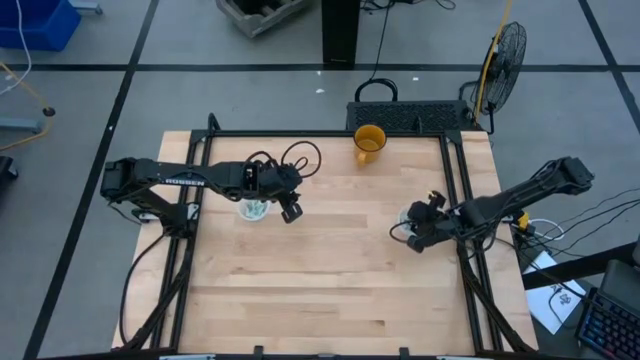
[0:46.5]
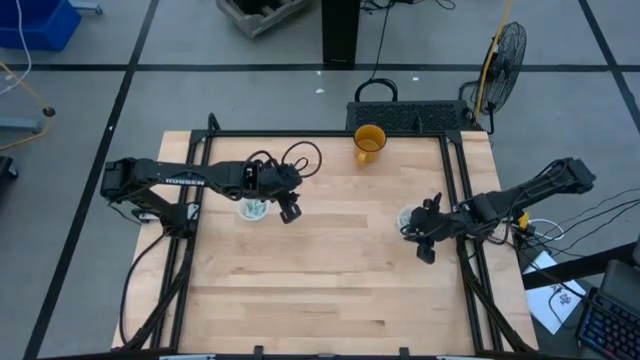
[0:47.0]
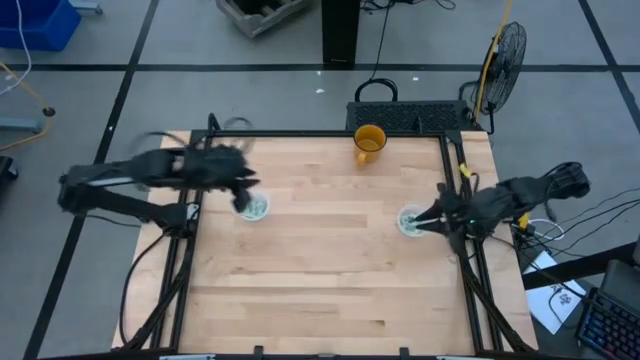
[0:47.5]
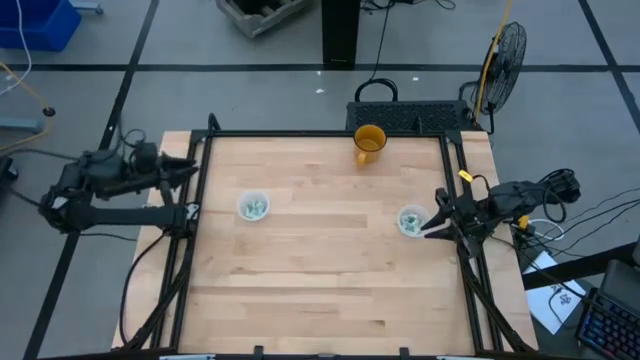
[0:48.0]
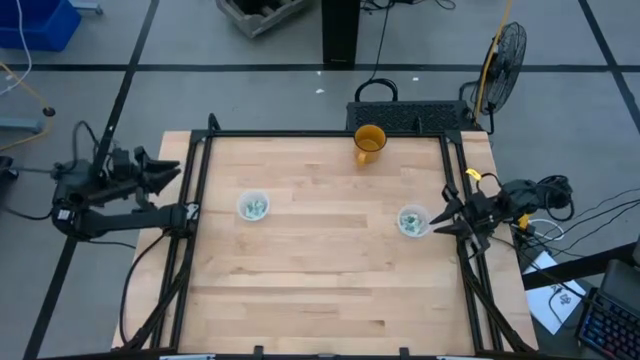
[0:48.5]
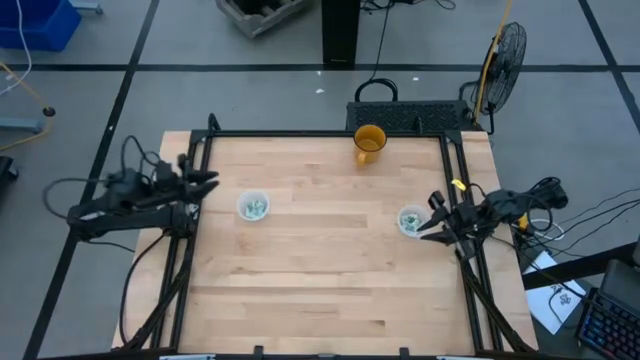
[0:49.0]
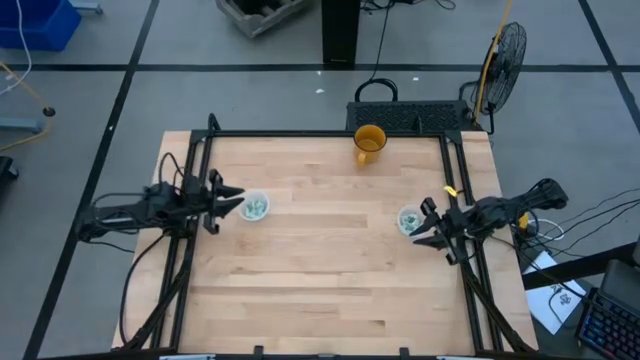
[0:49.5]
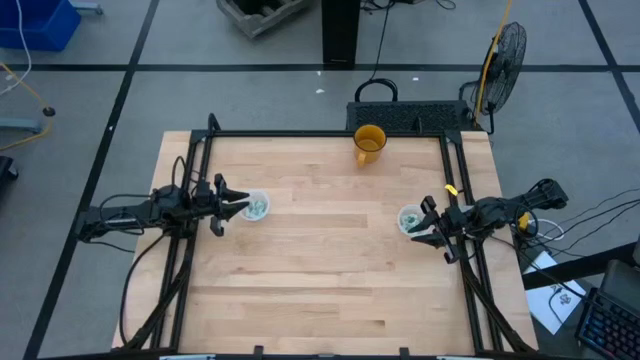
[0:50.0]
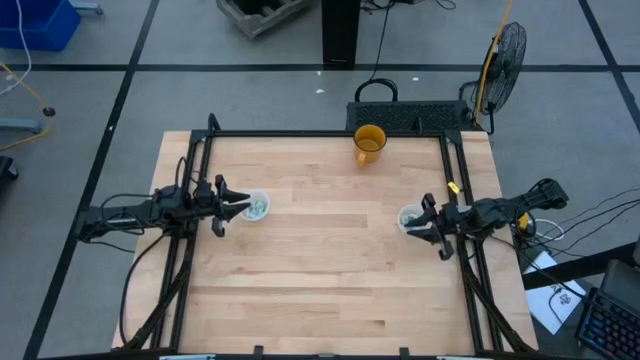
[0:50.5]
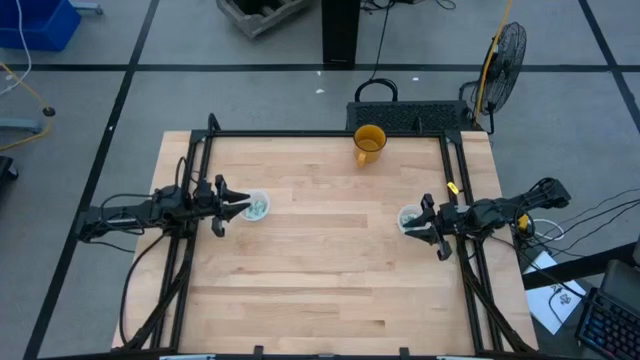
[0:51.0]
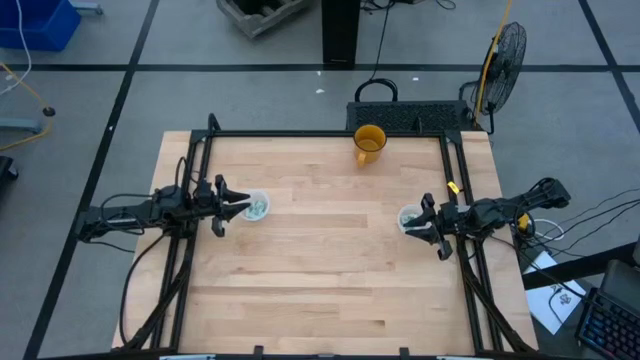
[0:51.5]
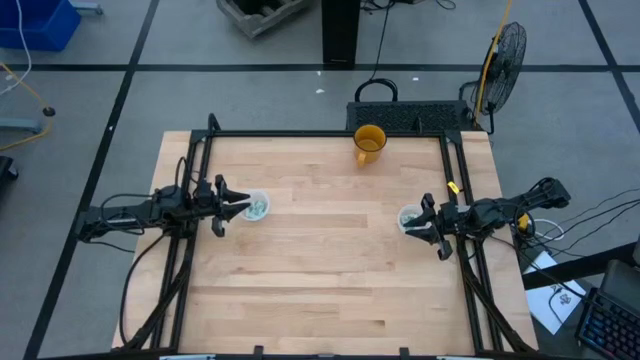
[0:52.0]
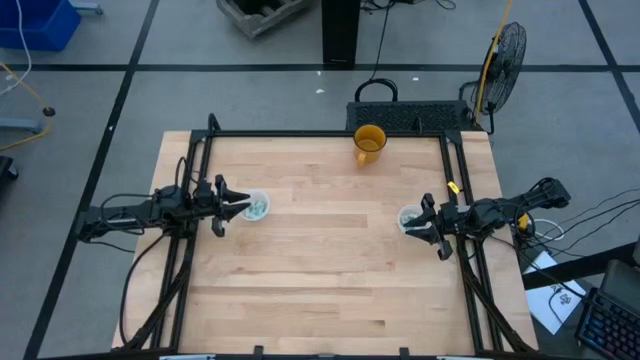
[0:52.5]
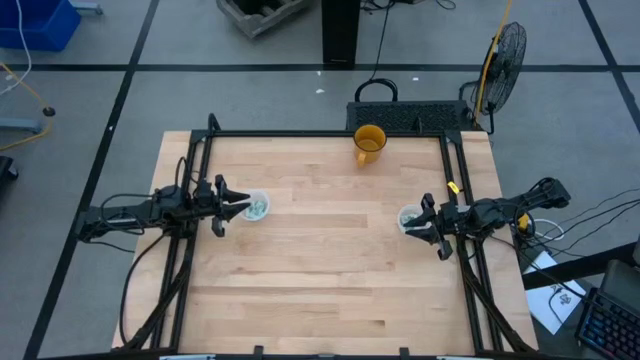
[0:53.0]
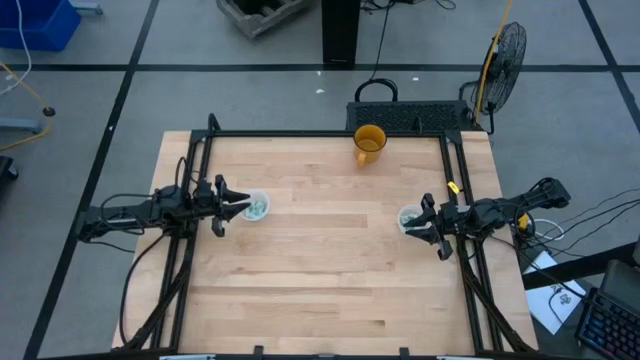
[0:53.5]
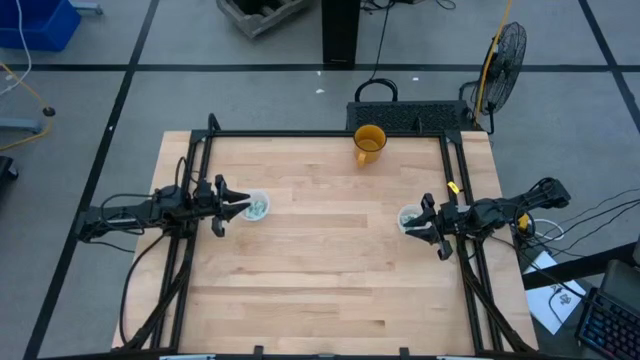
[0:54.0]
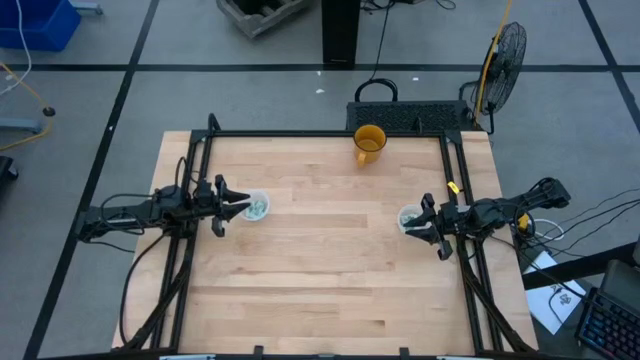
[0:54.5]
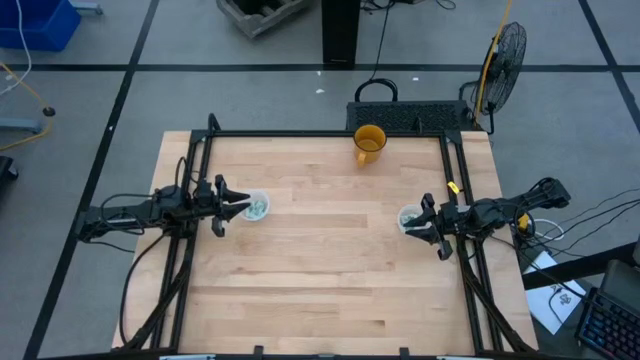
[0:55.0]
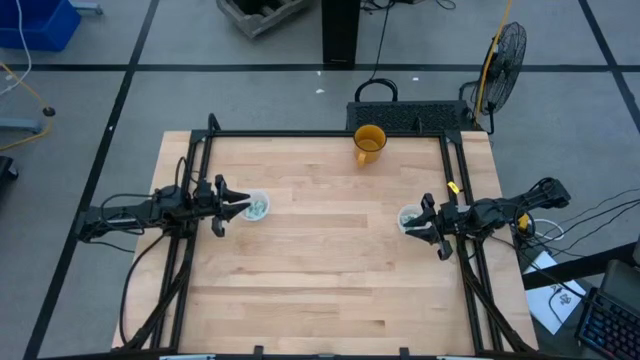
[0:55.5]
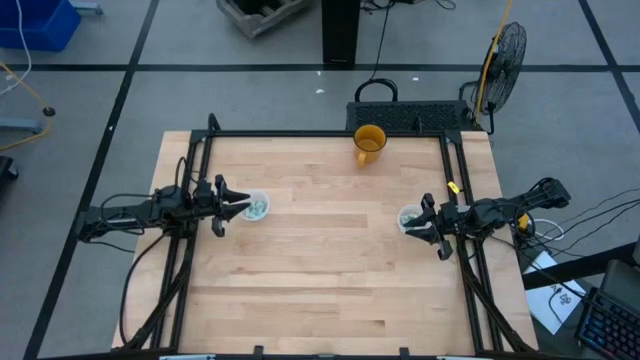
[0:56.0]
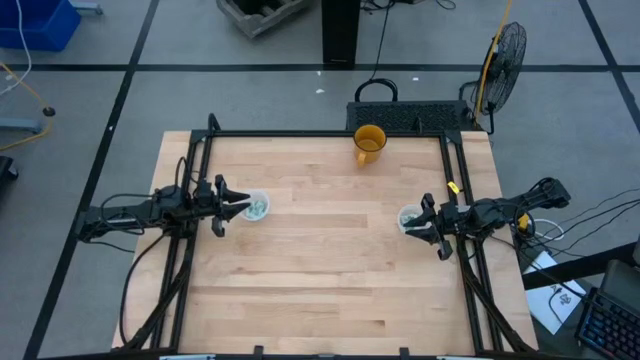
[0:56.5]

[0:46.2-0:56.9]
Task: Pick and place Stevia / Truvia into bins
Return to Home Position

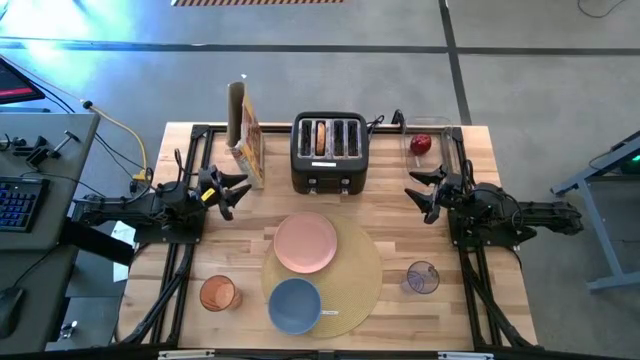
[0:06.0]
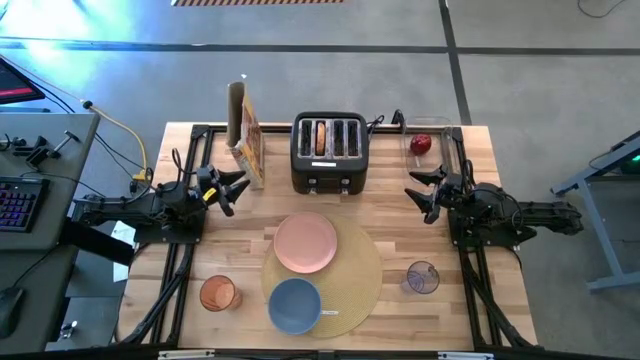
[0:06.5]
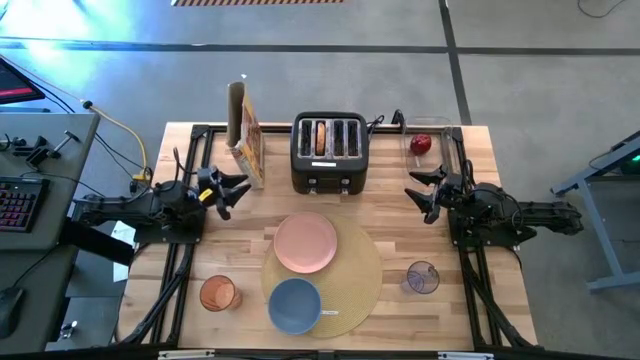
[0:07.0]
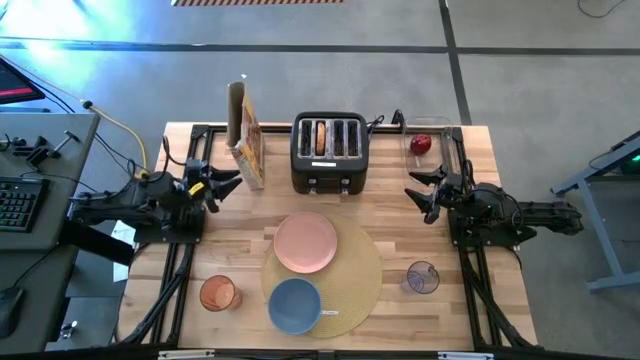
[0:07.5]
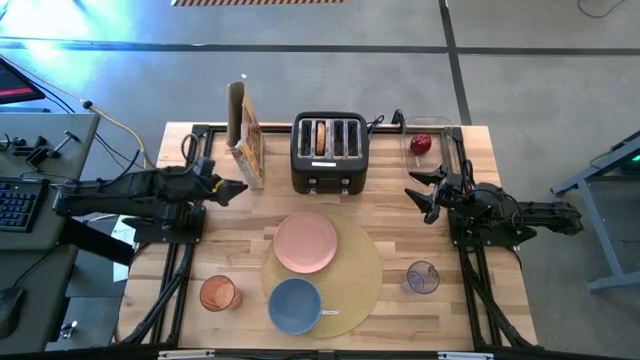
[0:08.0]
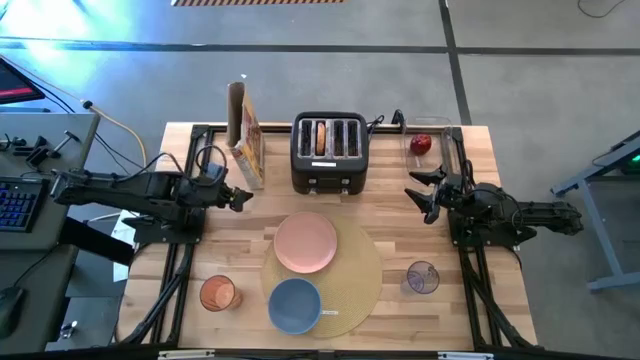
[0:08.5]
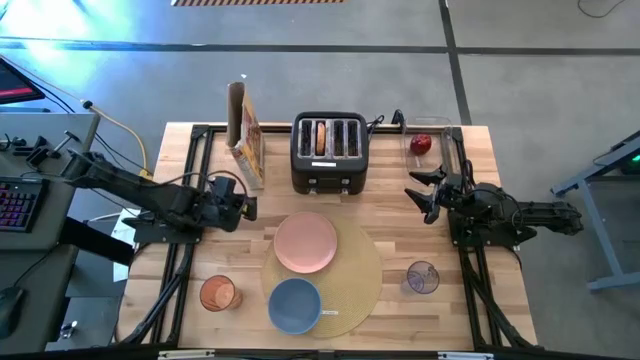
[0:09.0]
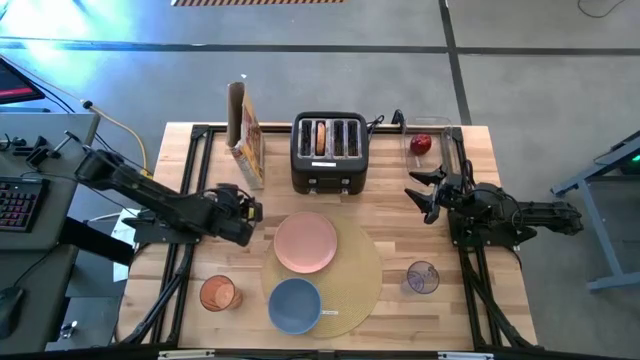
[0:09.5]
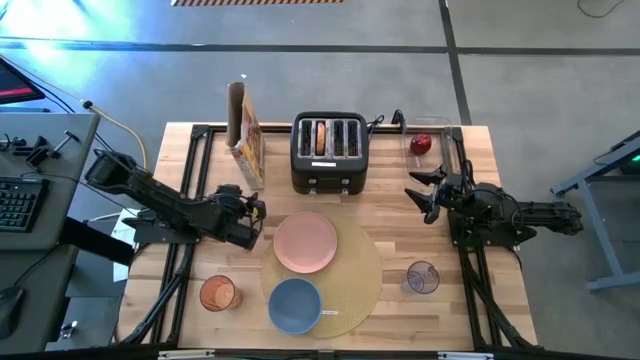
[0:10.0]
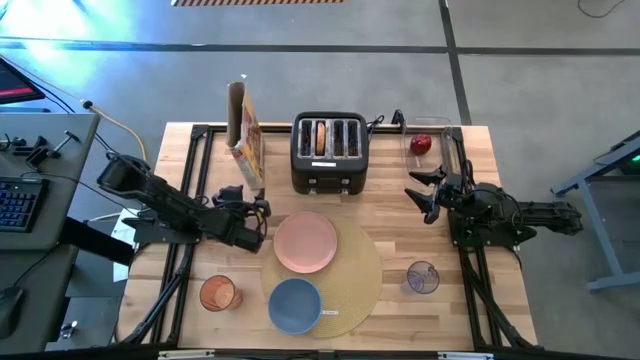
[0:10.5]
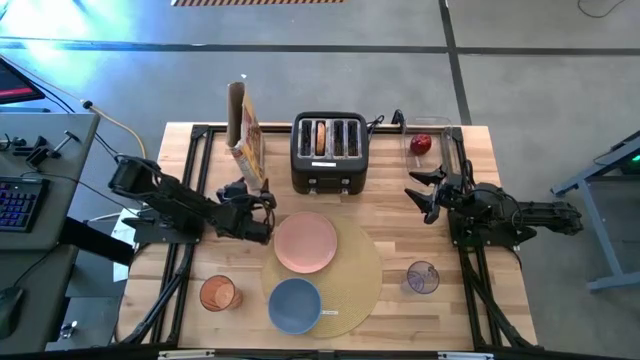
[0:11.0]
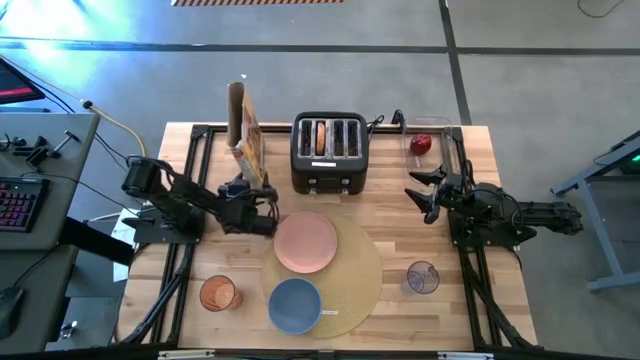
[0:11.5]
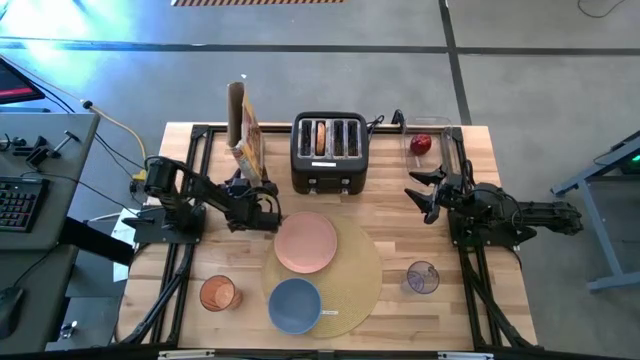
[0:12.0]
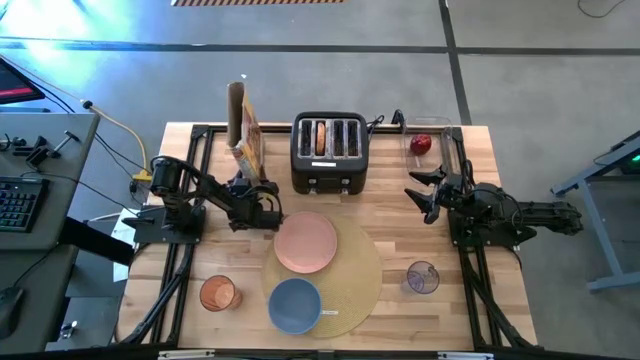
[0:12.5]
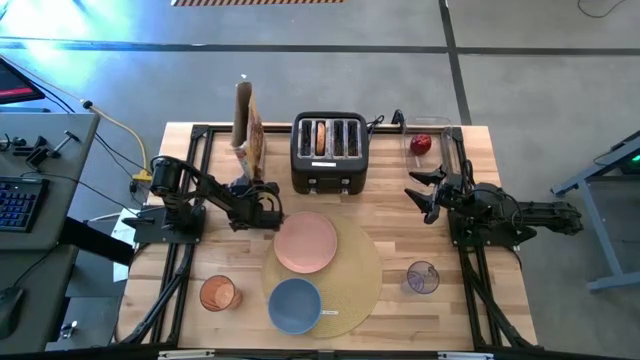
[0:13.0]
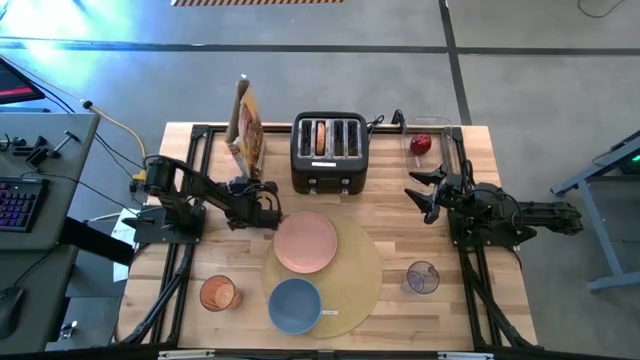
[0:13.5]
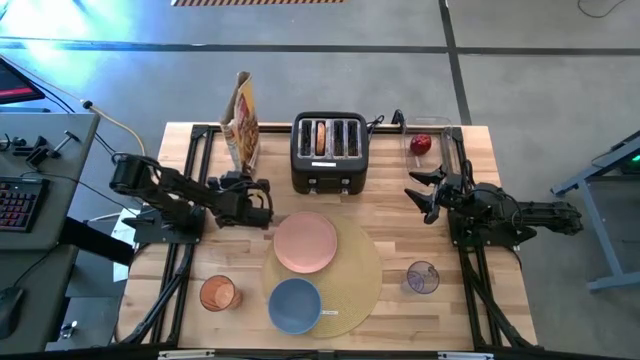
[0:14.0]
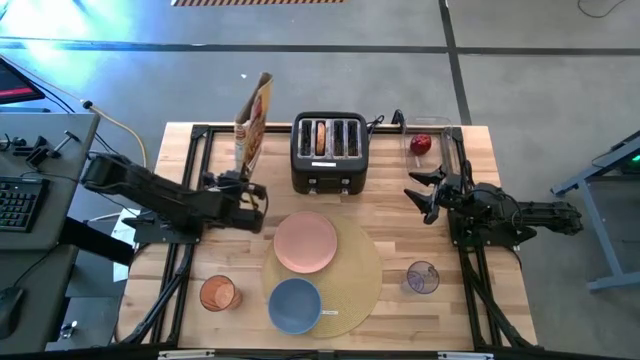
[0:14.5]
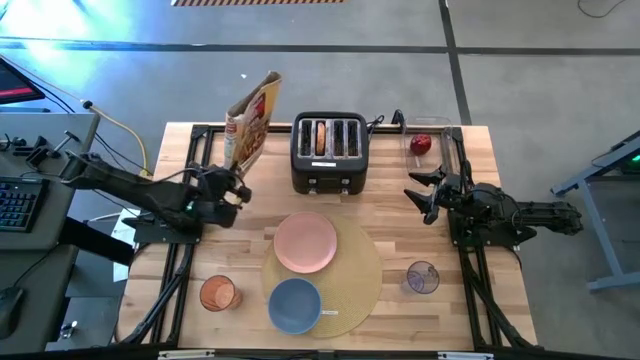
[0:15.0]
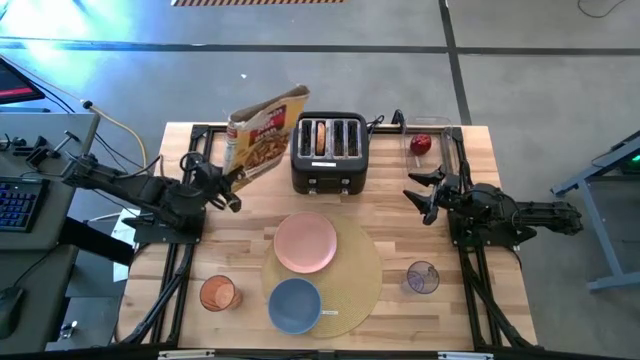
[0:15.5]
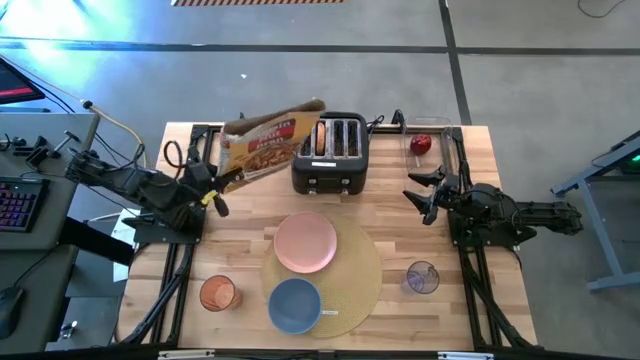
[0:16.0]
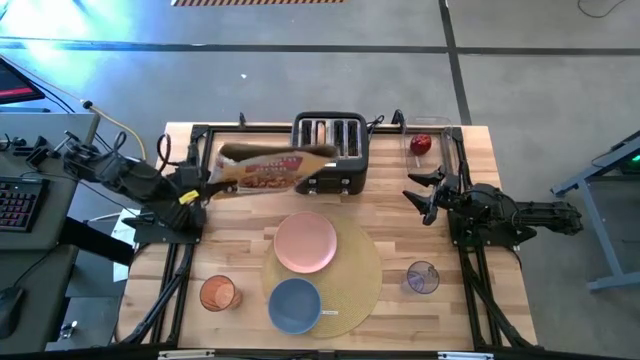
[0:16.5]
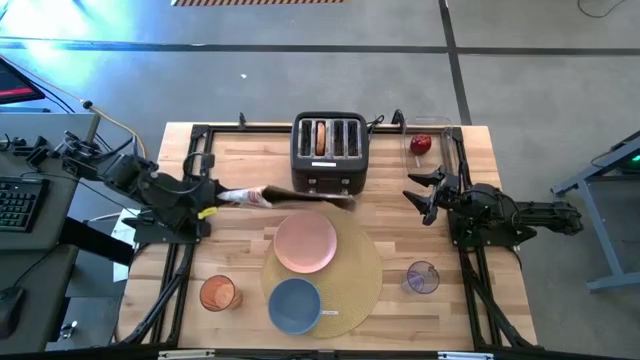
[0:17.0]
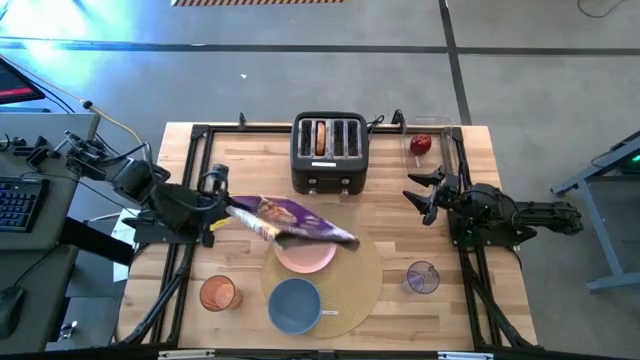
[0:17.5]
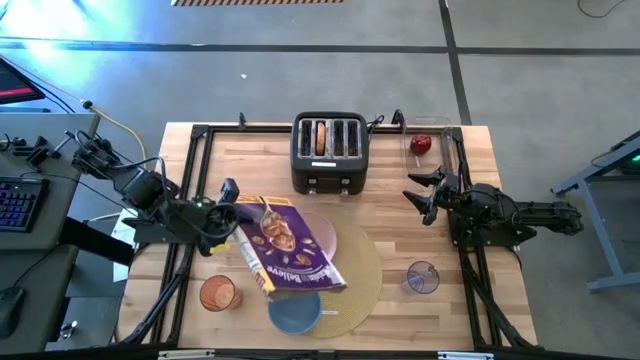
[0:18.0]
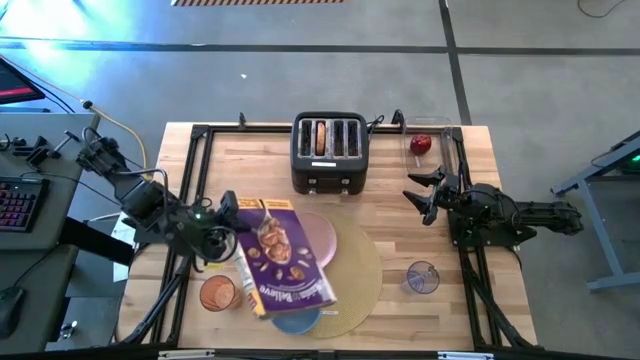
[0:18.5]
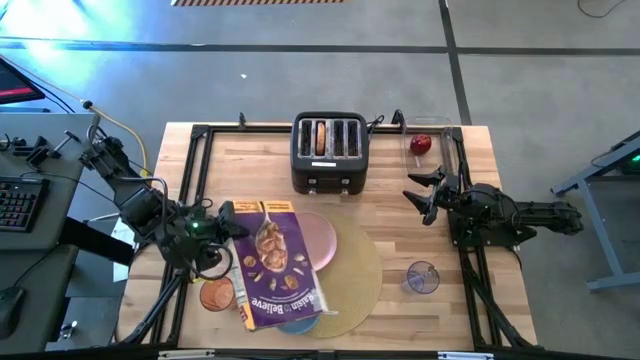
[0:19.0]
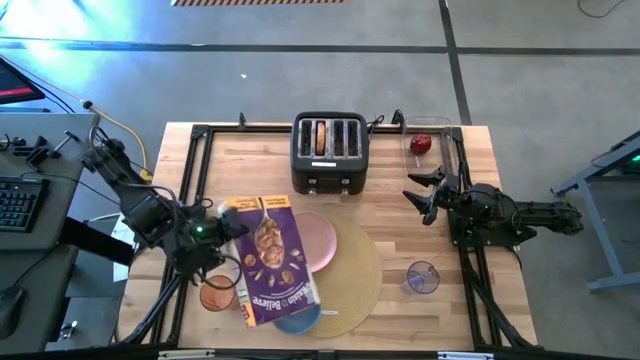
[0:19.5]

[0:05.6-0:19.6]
Task: Arrange a breakfast setting
Pour the cereal into the bowl
